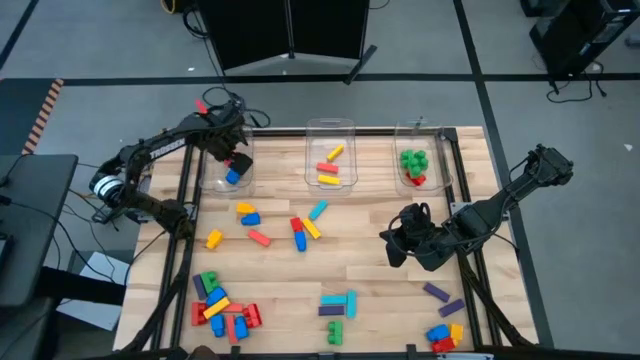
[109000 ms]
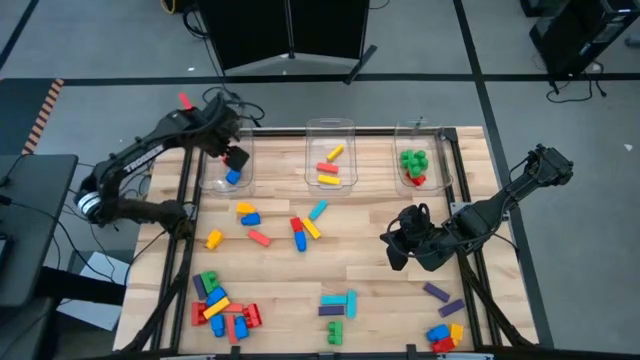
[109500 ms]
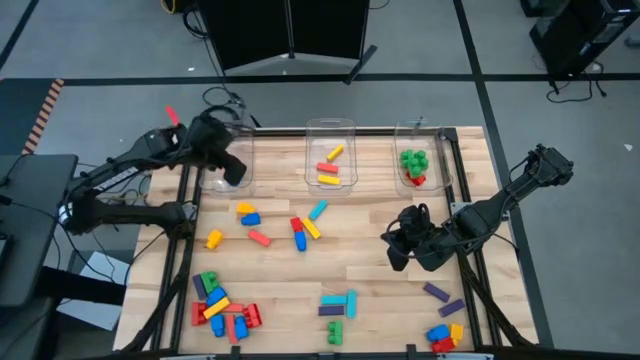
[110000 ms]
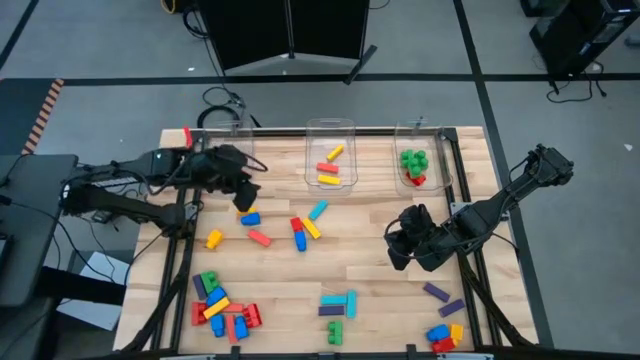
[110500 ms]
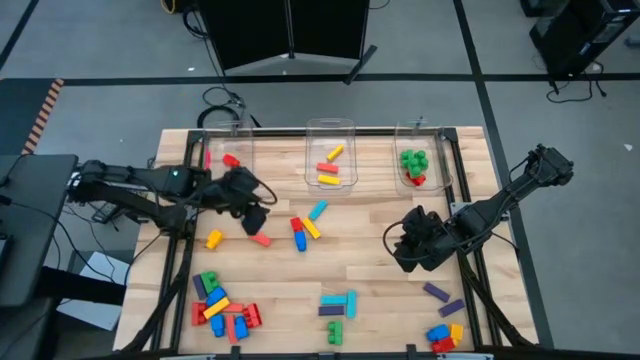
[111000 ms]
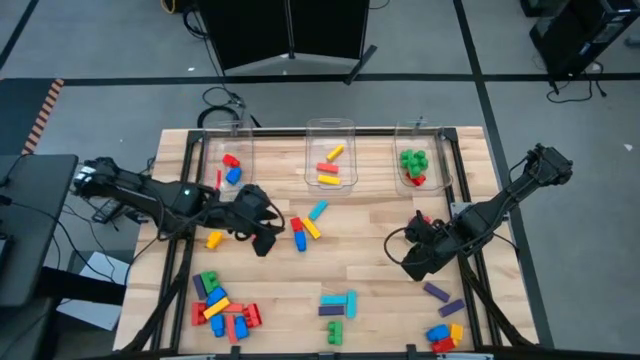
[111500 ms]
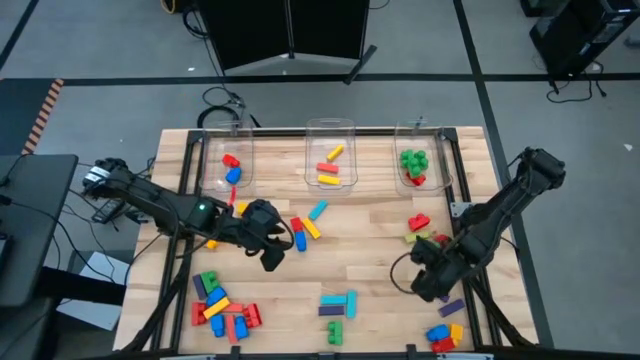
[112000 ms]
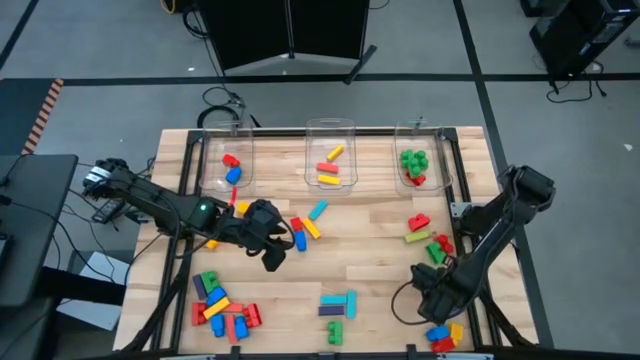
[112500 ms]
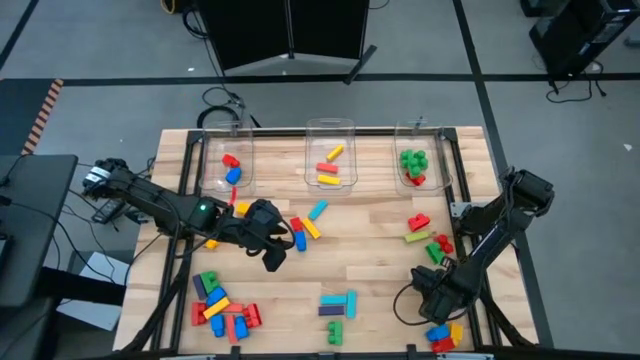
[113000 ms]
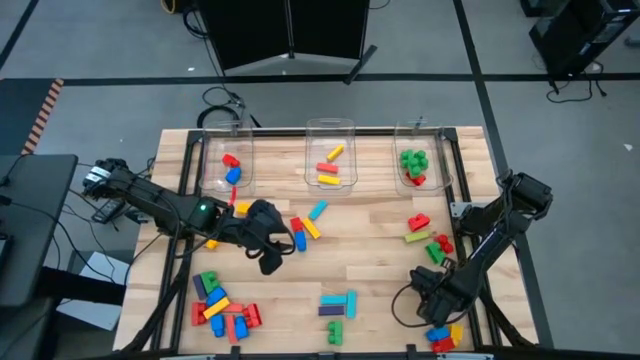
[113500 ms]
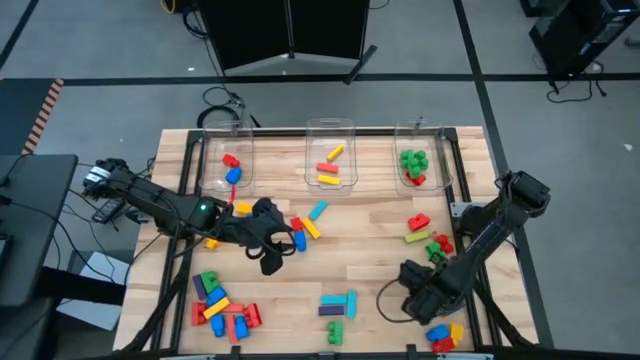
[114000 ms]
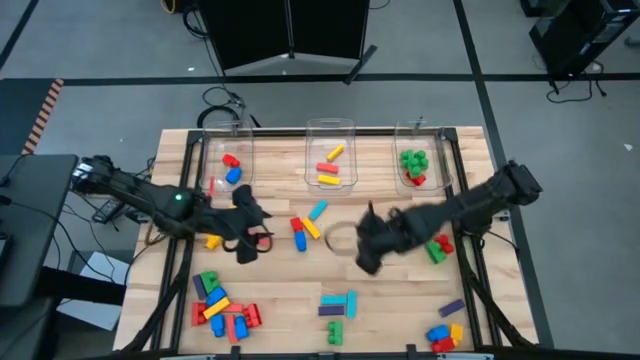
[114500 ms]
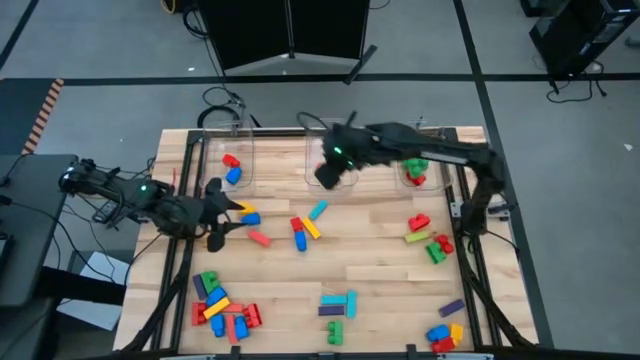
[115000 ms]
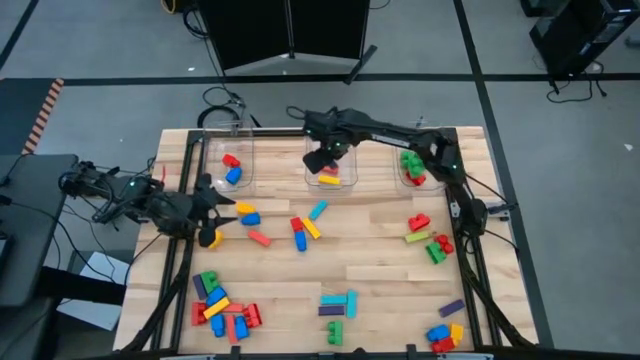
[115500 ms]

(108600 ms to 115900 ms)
Task: Sort blocks by size
Put the purple block into the middle transparent bin

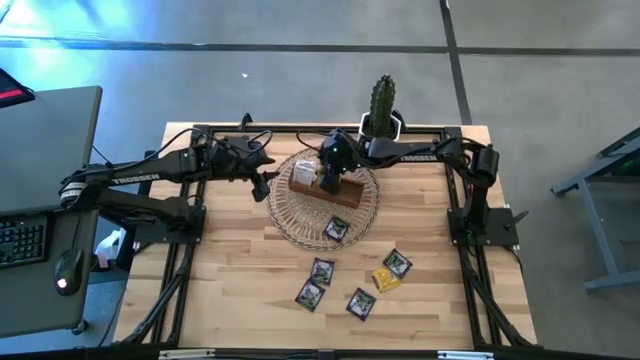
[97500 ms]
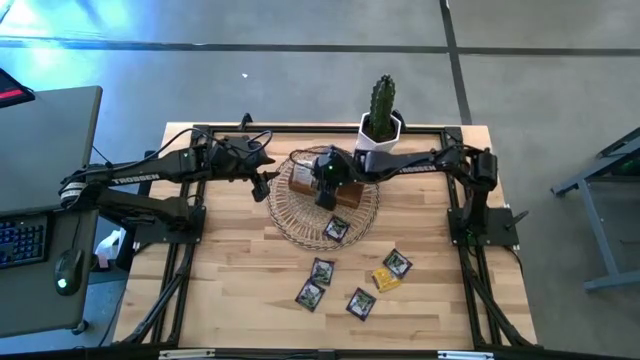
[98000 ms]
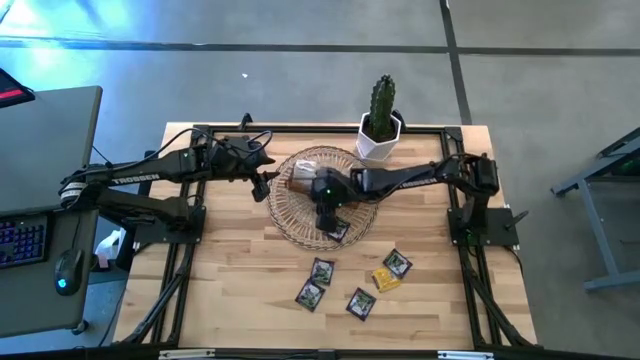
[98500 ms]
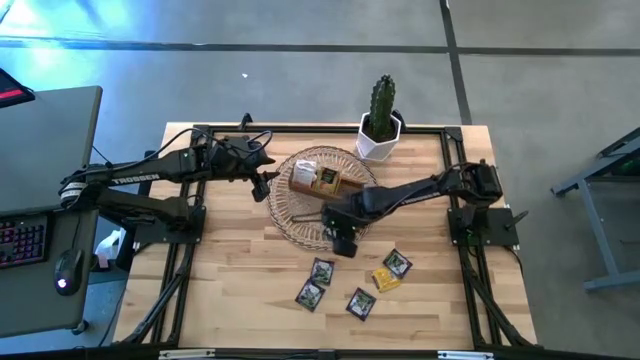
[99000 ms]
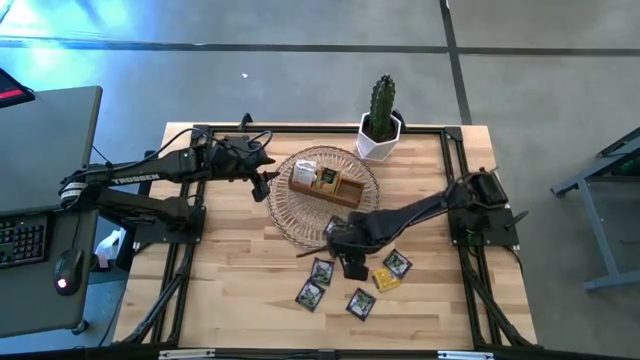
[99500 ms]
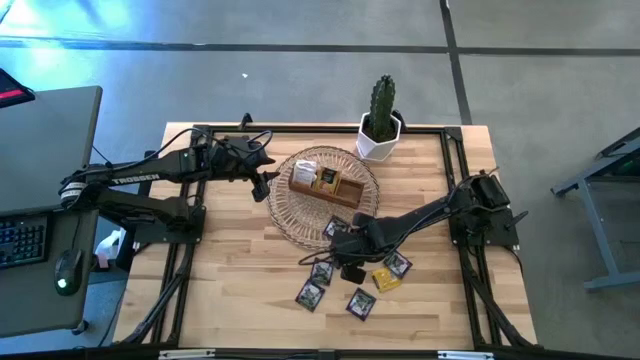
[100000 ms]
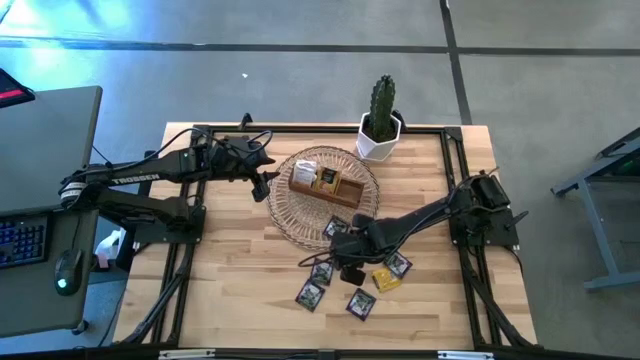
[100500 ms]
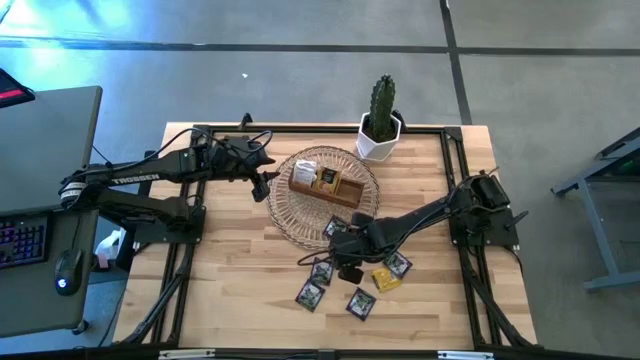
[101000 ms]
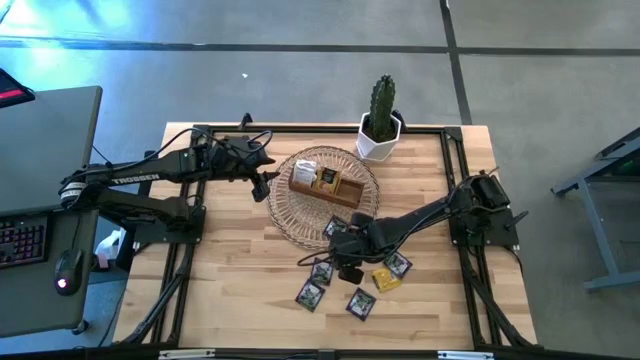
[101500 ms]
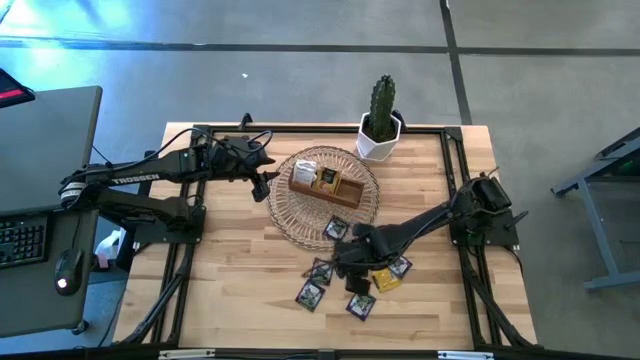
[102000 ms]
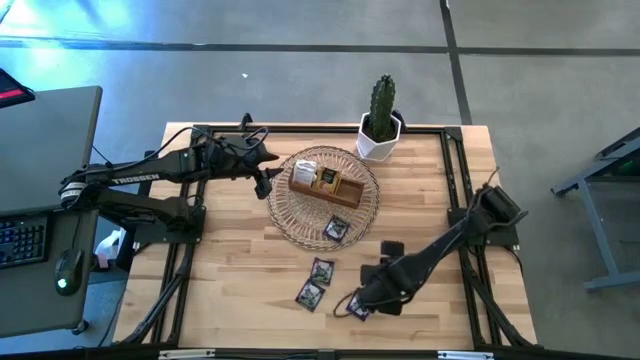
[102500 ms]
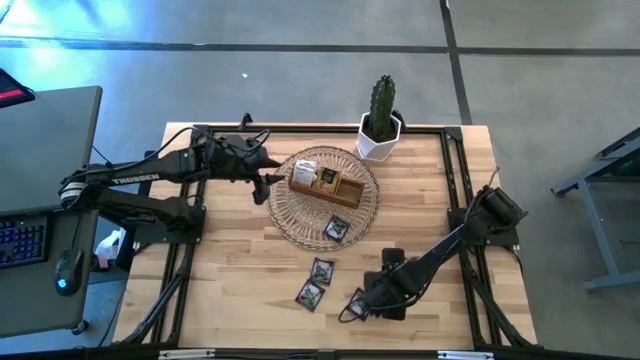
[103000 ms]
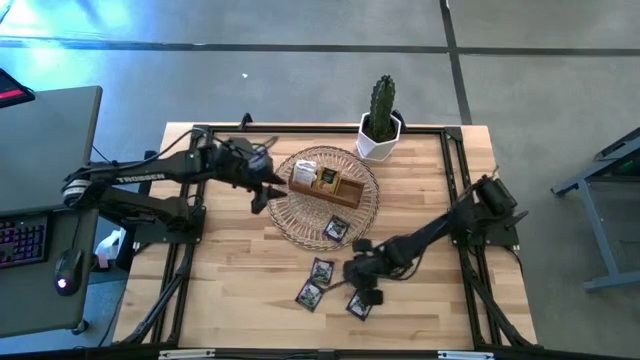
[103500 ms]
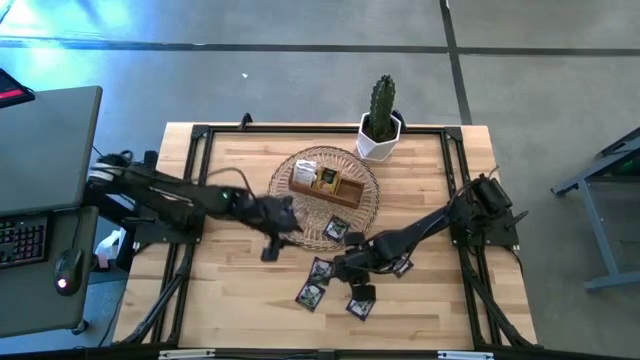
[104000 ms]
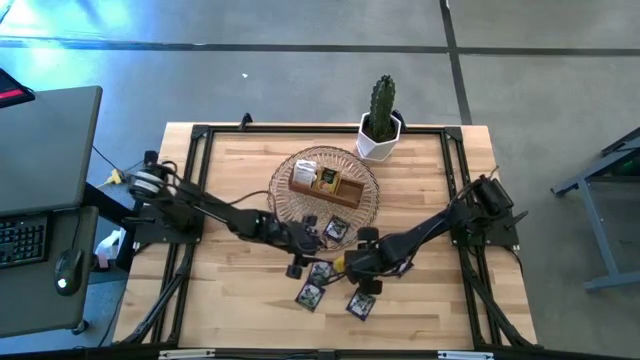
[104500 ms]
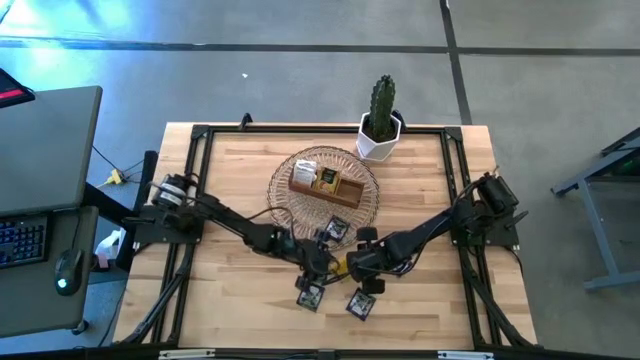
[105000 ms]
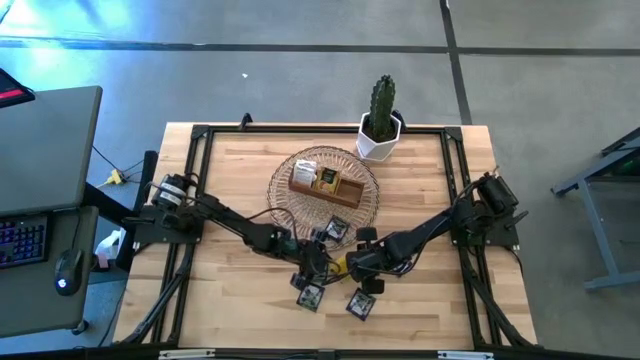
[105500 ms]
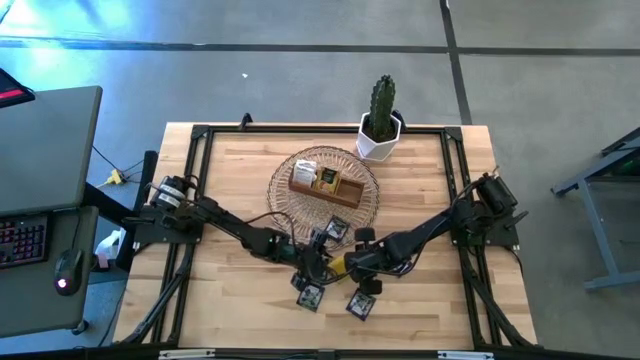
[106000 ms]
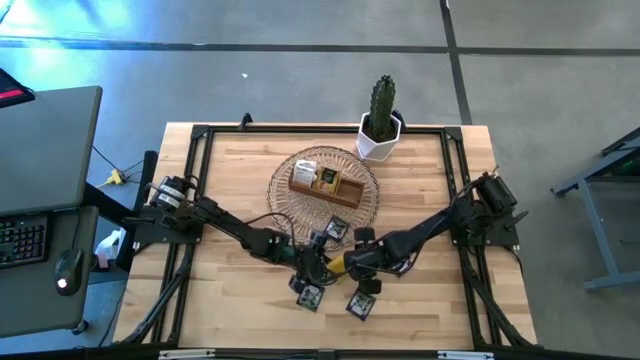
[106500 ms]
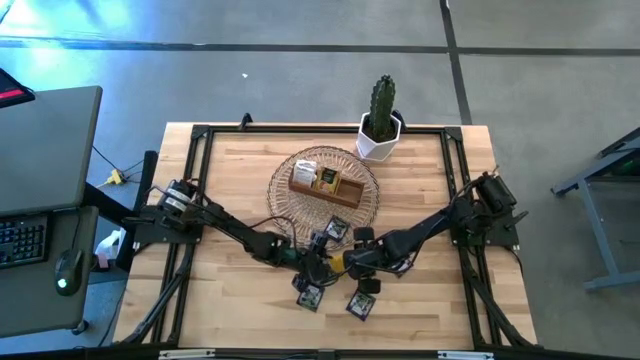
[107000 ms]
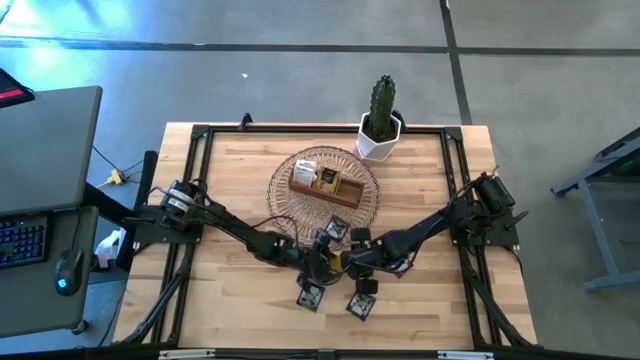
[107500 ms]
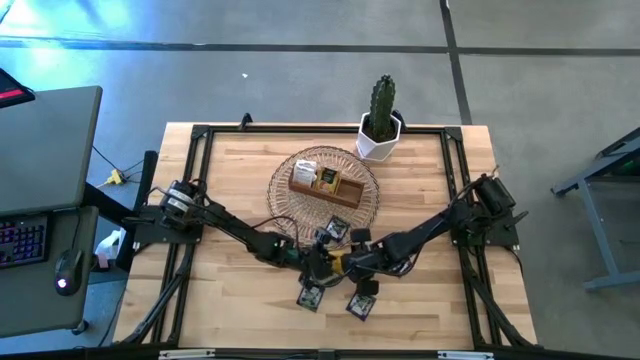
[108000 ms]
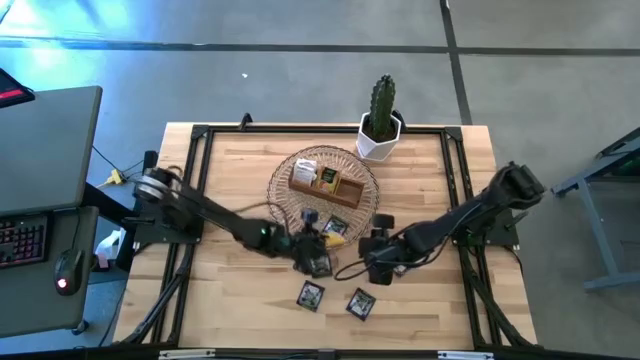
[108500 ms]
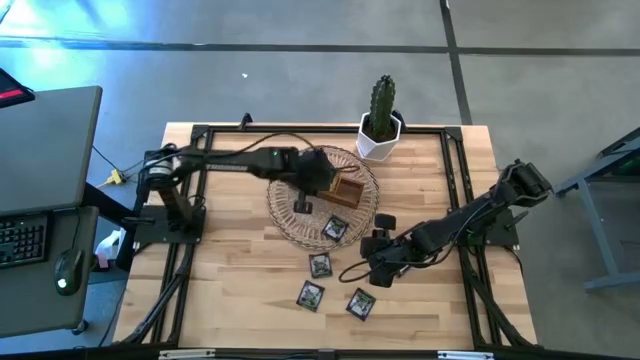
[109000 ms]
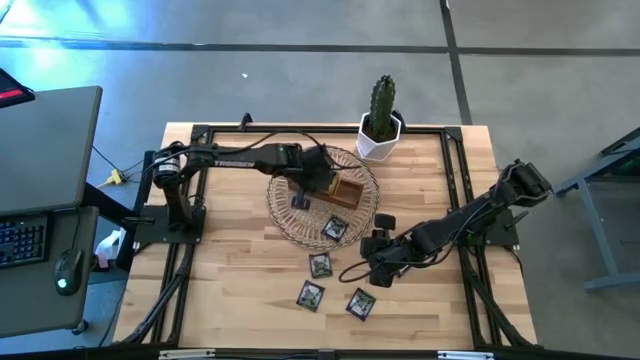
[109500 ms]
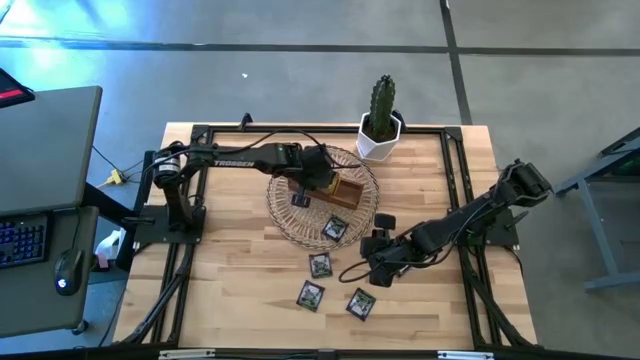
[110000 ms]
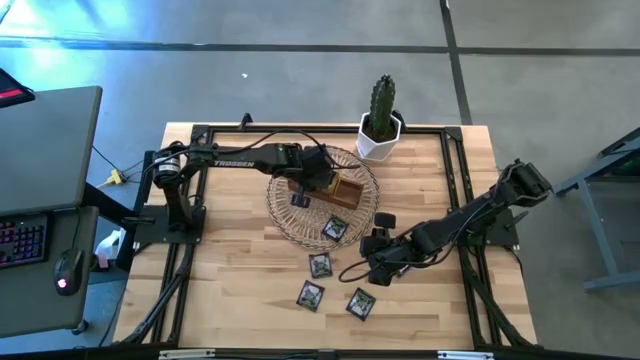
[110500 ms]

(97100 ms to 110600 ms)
Task: Pick & Place Tea
Put the yellow tea pack into the middle section of the wooden organizer
